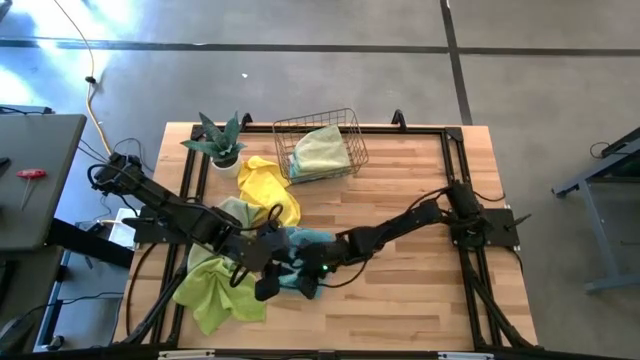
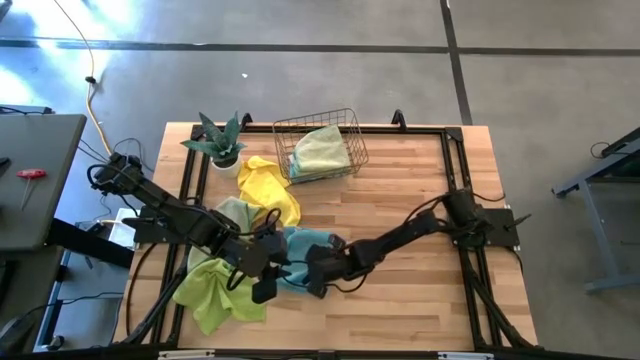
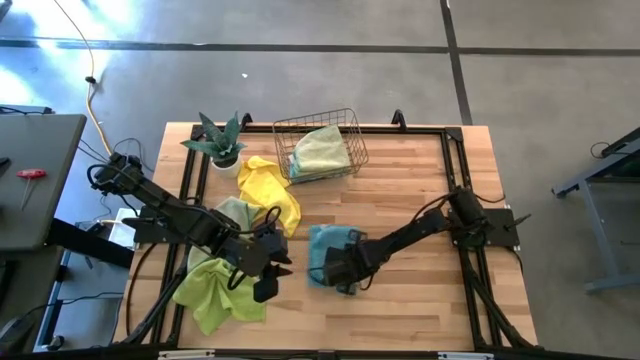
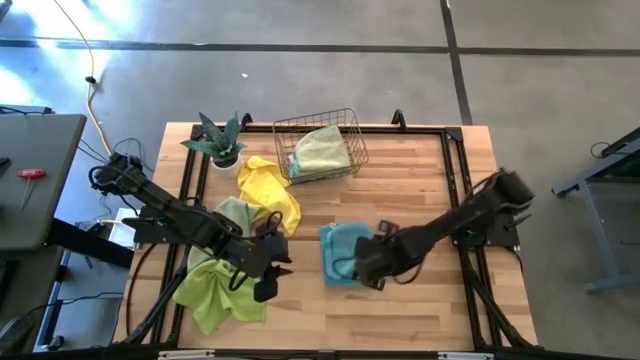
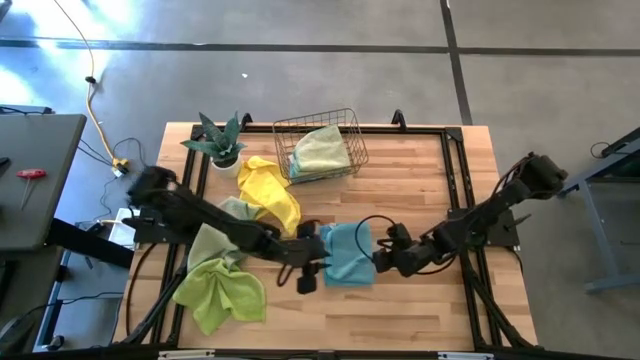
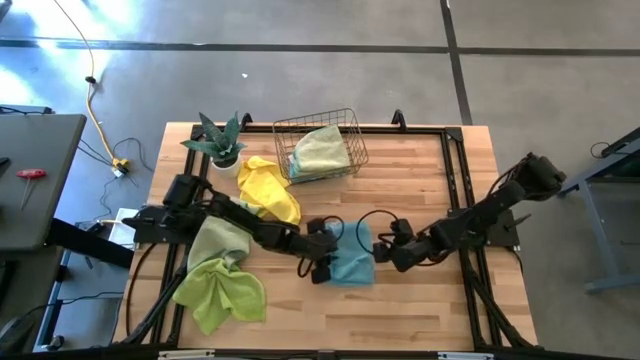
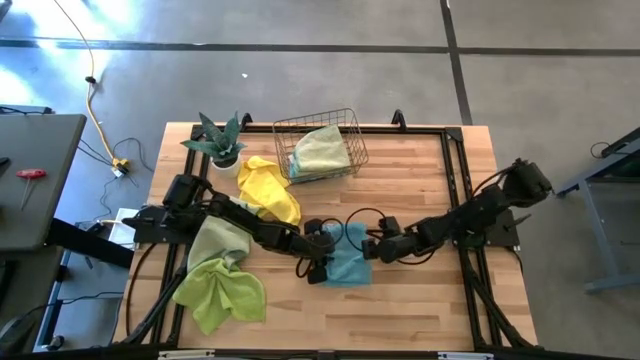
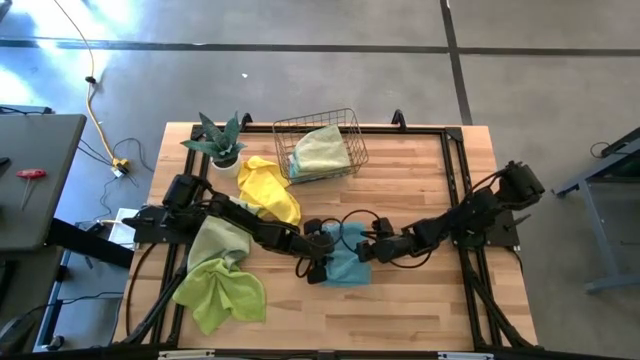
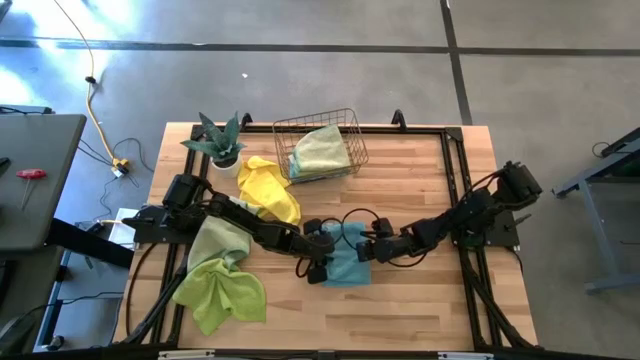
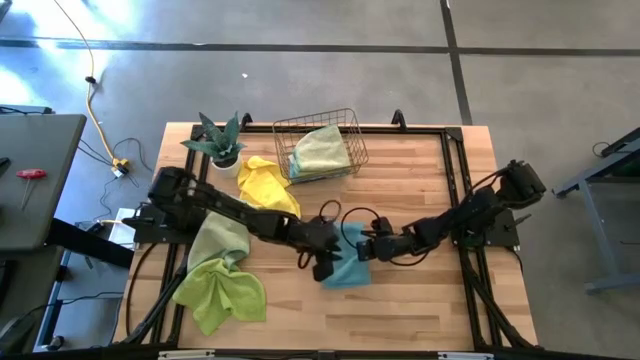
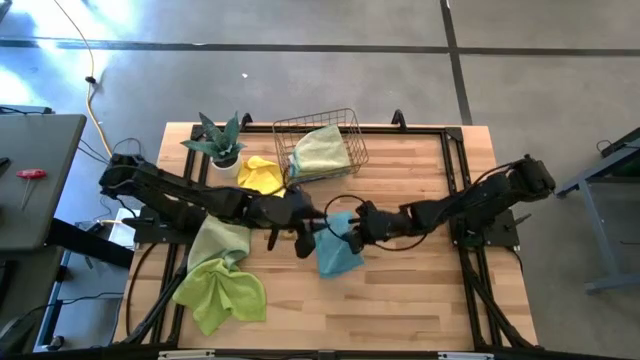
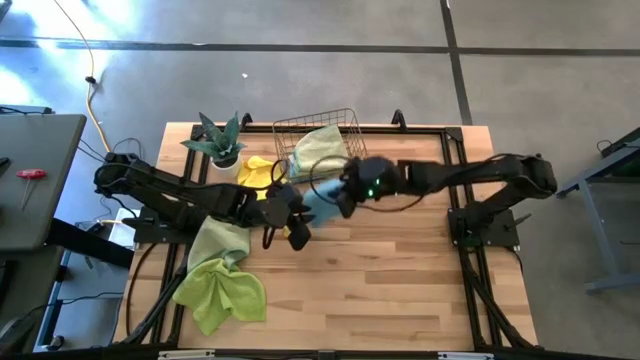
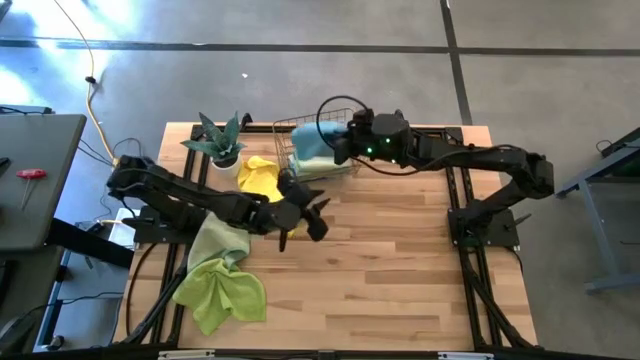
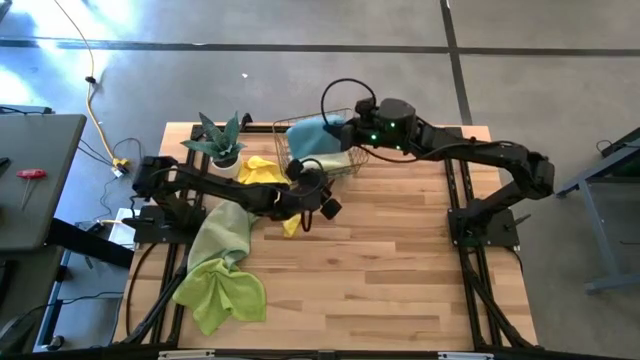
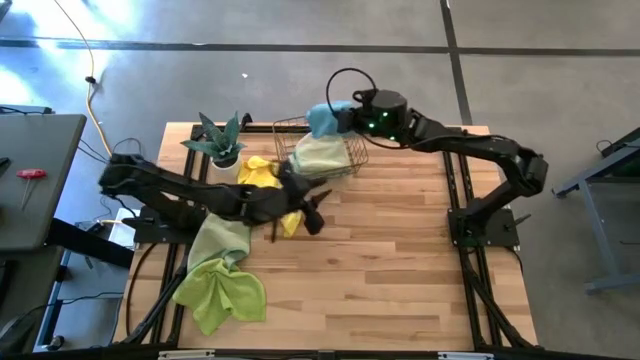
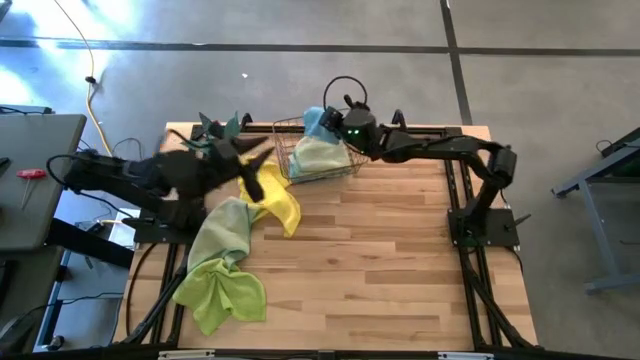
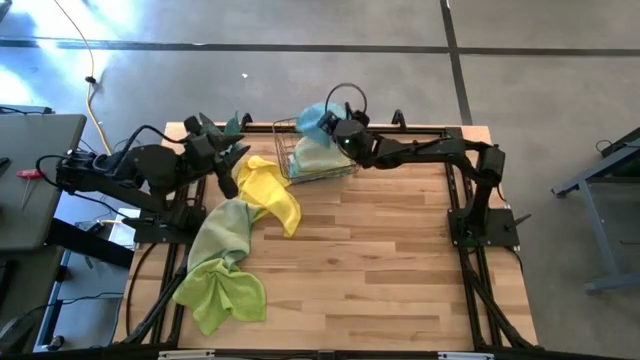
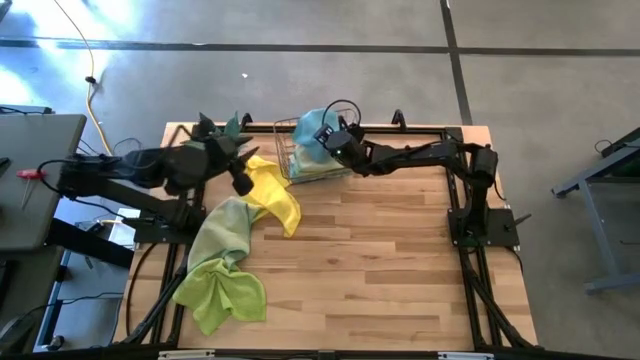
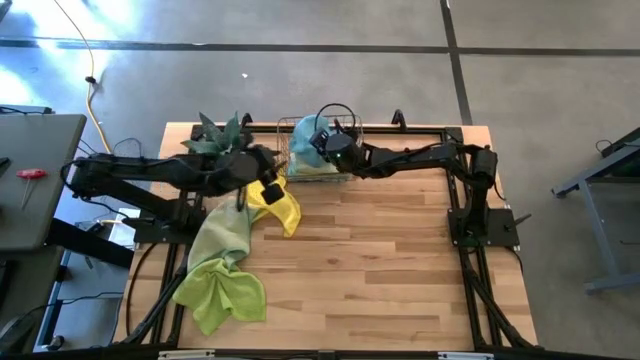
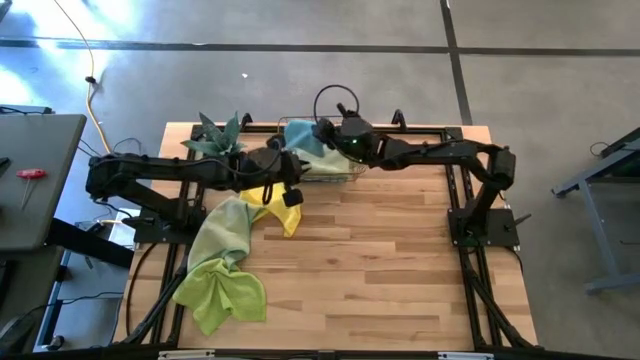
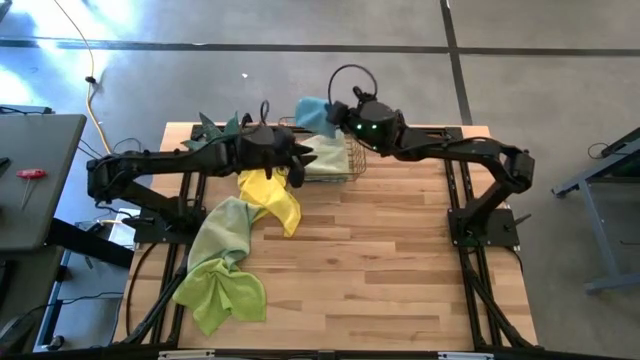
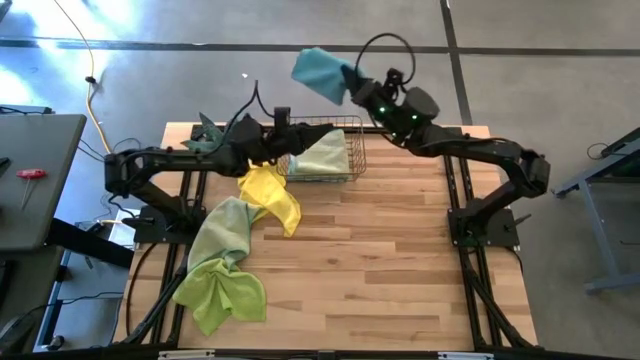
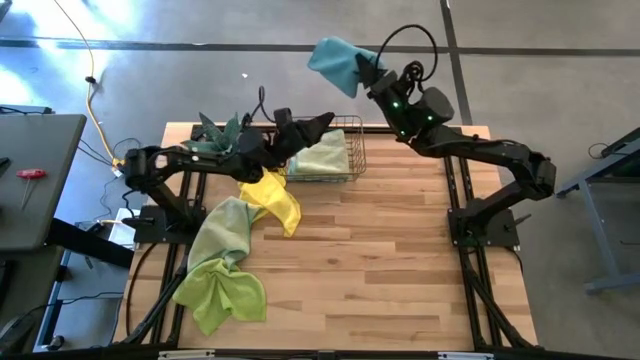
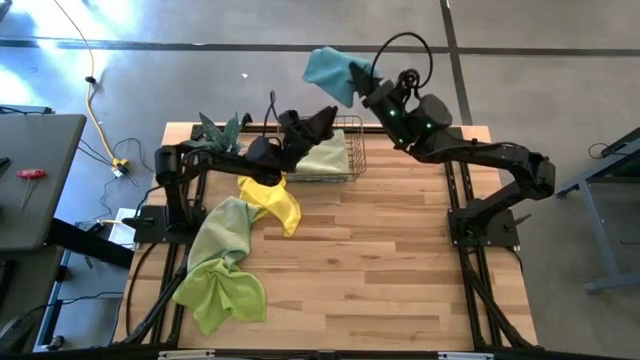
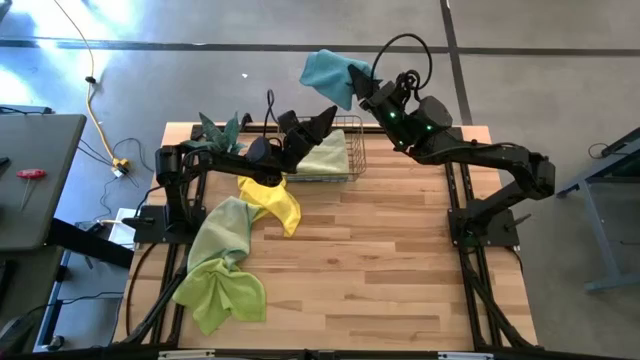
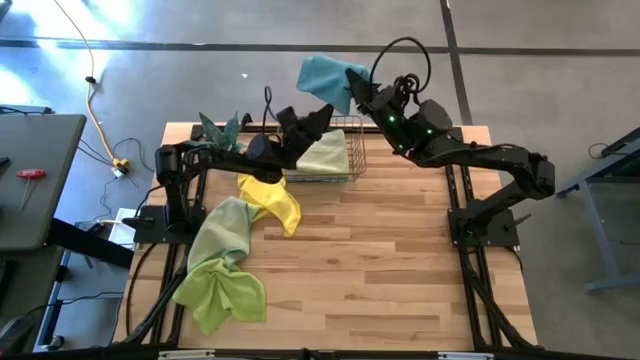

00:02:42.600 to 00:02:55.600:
Task: Fold microfiber towels
Put the blue microfiber cloth in the basket

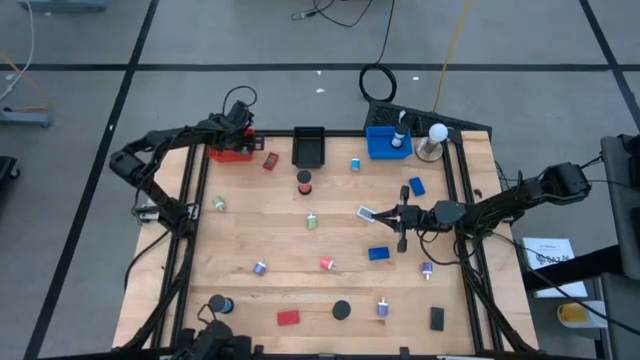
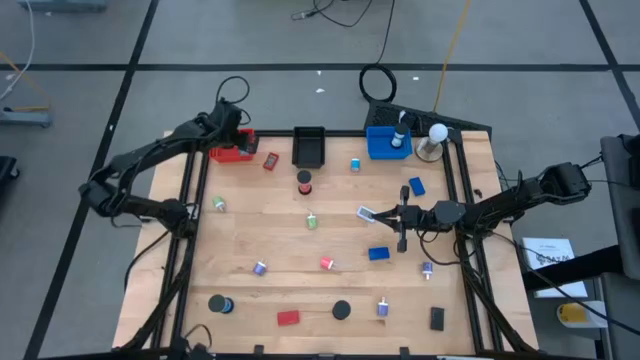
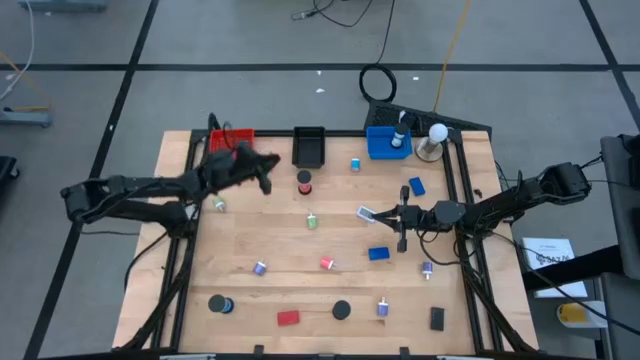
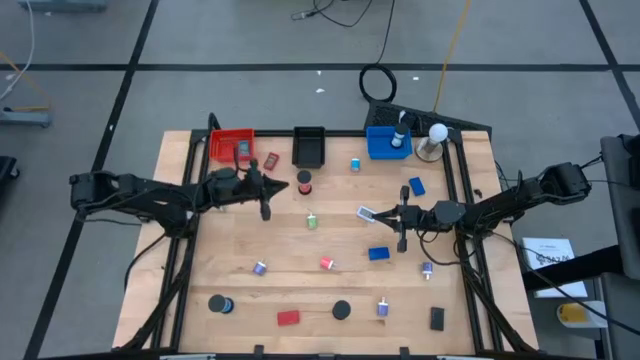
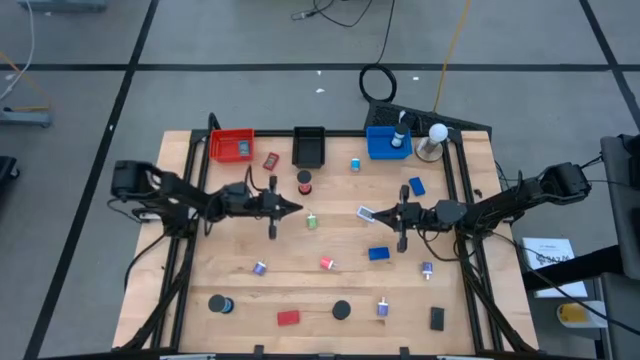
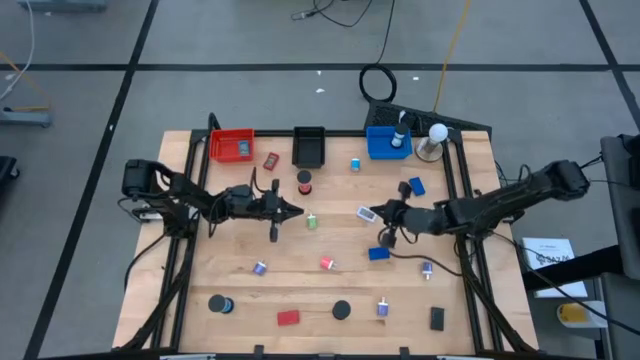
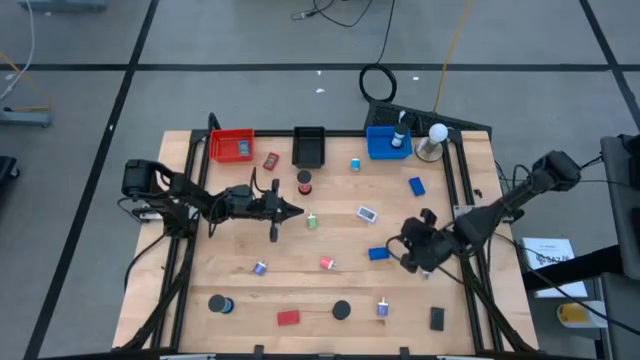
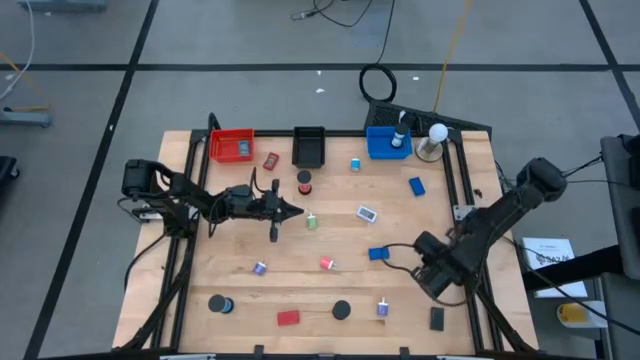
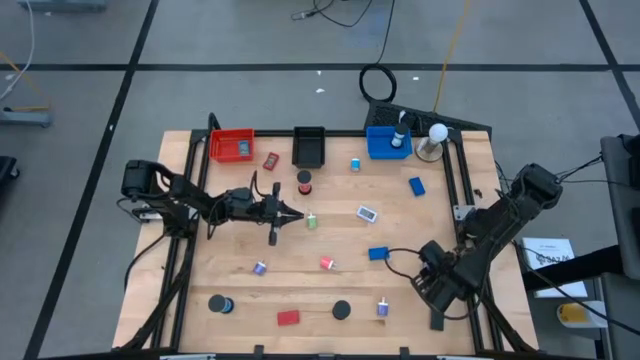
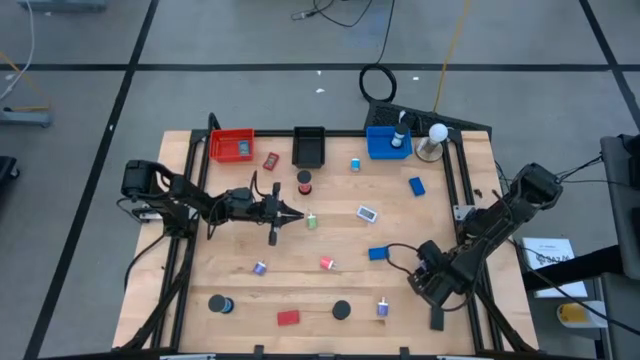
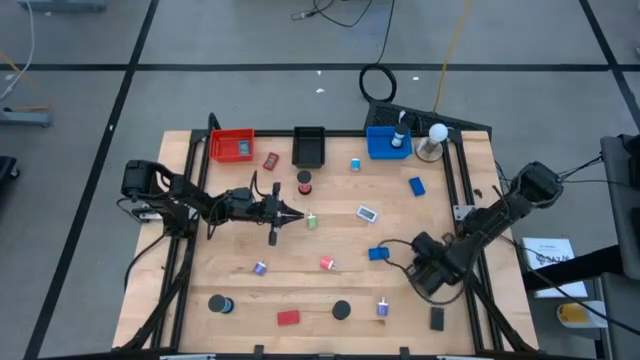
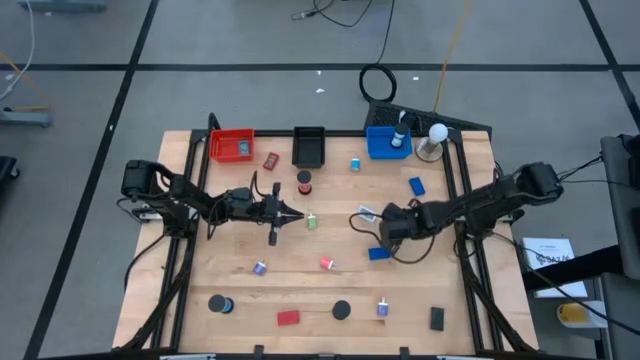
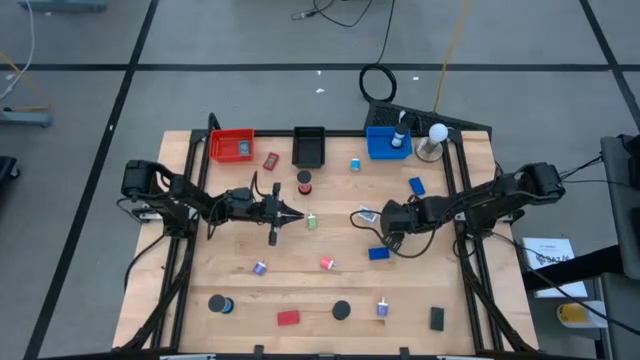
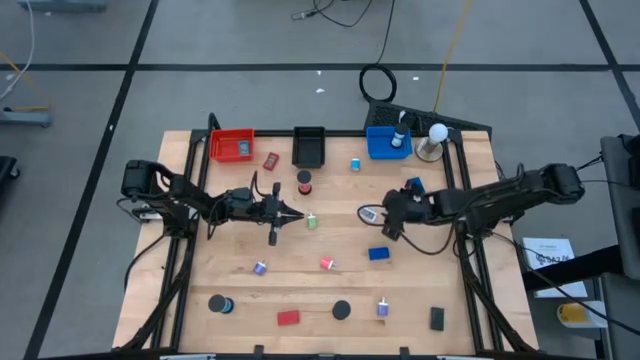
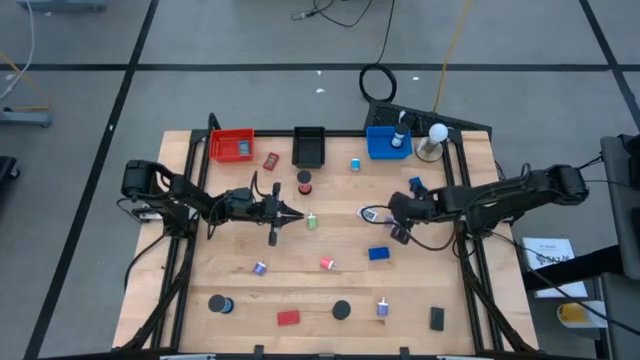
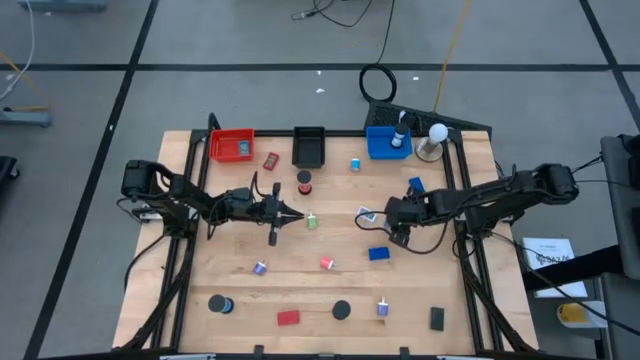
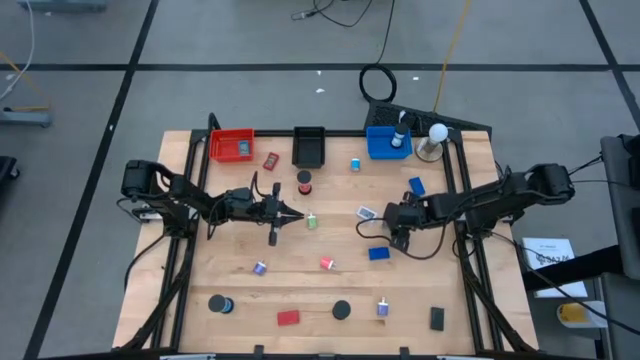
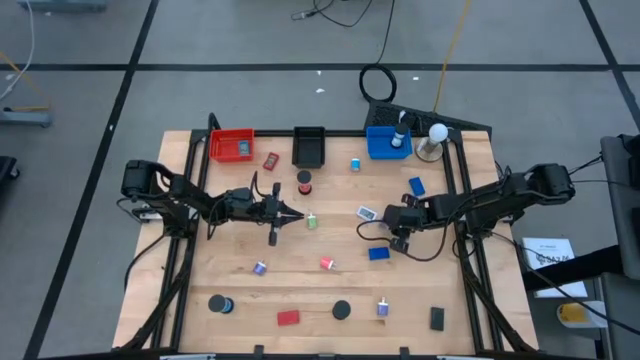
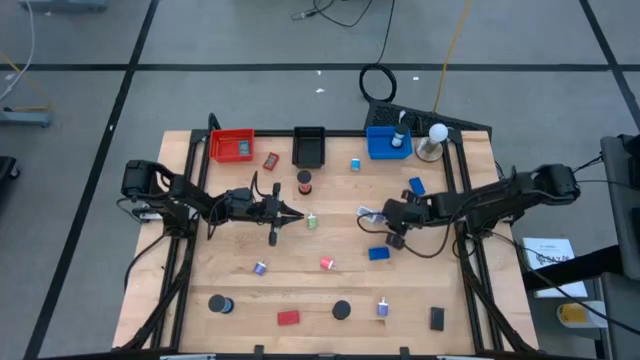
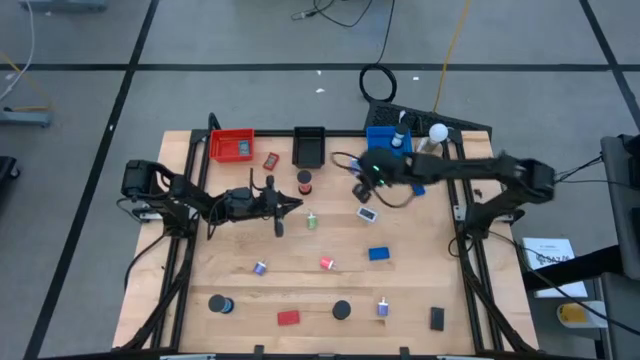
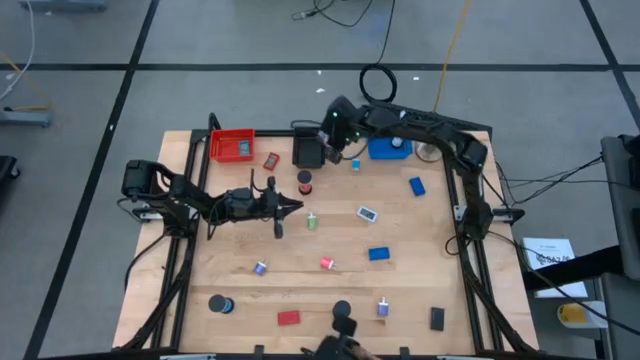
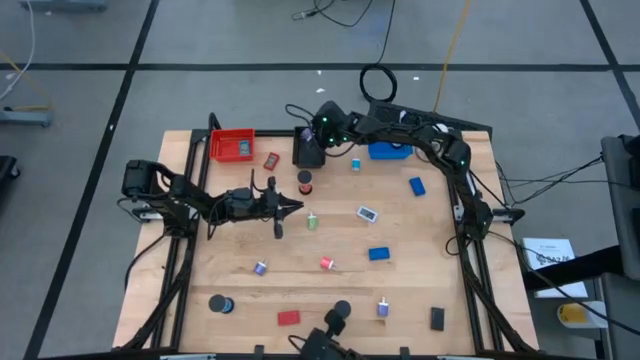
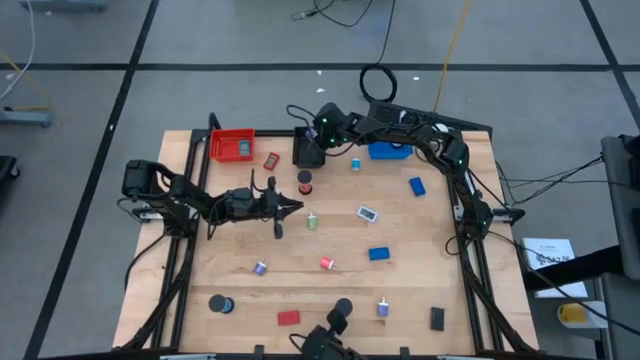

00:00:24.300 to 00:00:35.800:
Task: Pick & Place Office items
Put the top right blue charger adapter head into the black bin
